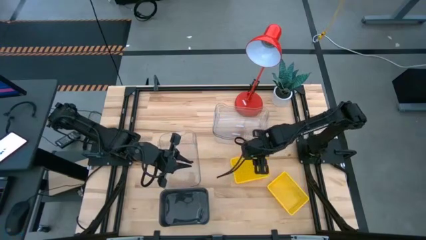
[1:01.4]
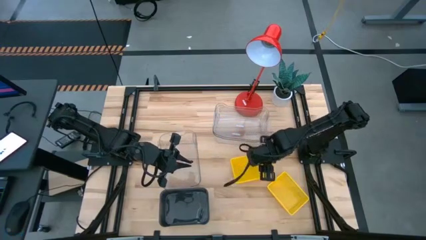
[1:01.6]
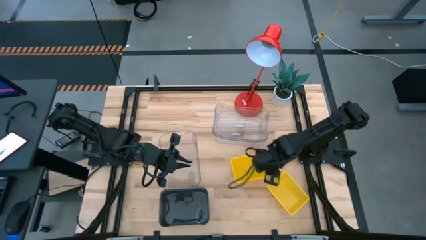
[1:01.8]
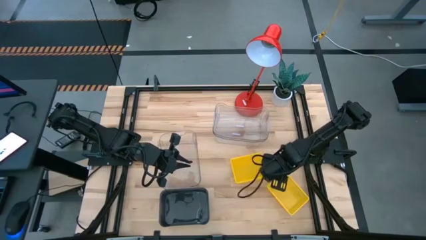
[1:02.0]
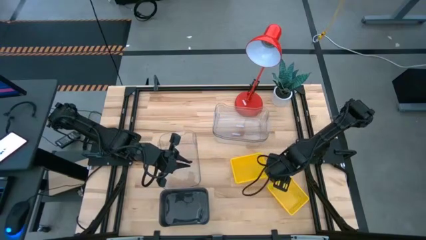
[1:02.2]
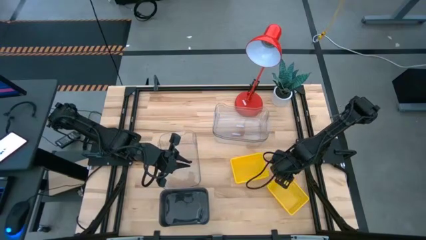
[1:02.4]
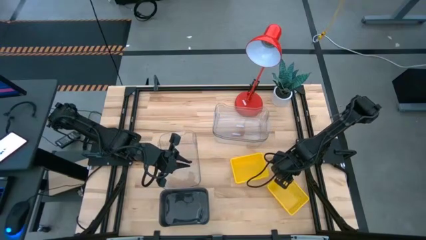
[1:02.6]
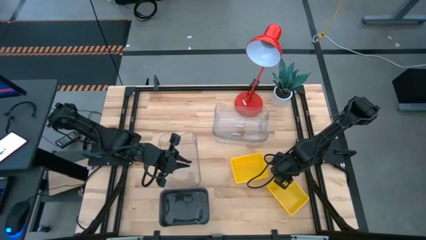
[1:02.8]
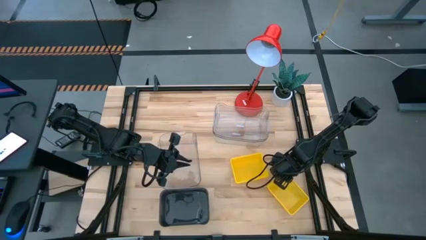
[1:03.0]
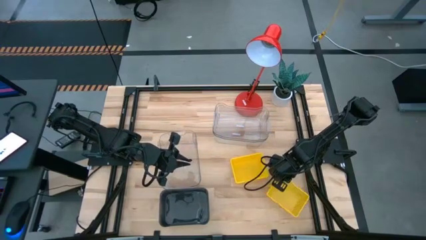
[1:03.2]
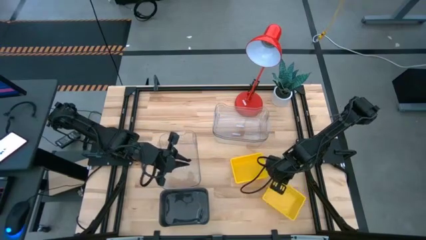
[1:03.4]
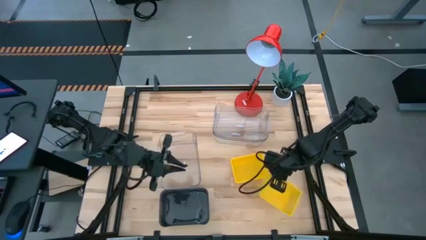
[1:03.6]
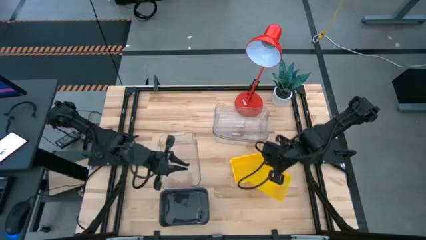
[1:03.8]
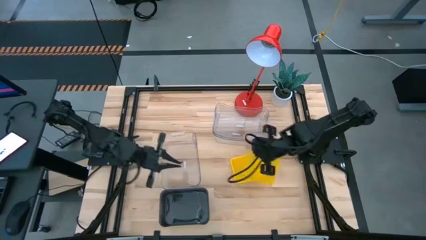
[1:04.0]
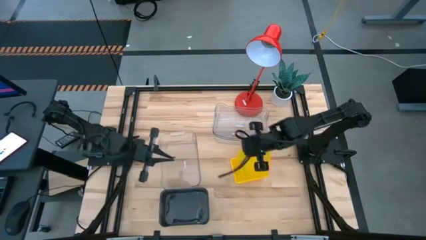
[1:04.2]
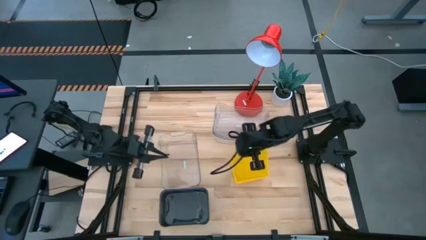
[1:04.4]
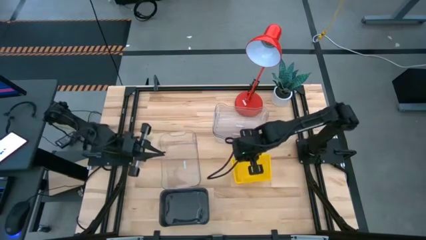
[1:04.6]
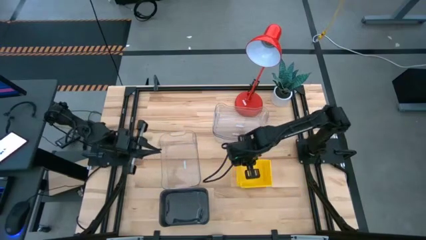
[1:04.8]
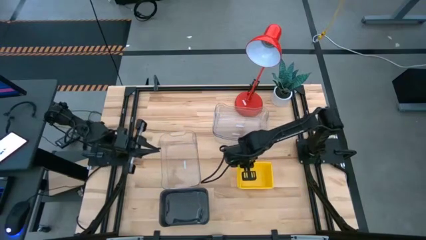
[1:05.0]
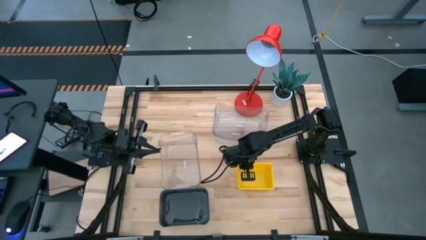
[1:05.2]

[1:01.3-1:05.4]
Stack the yellow bin on the left yellow bin

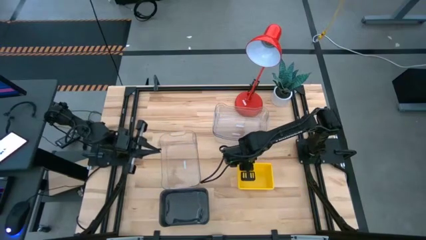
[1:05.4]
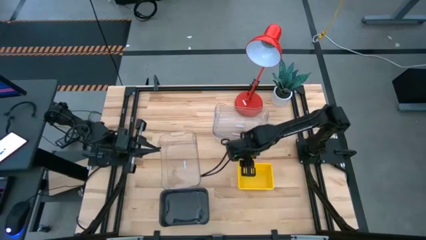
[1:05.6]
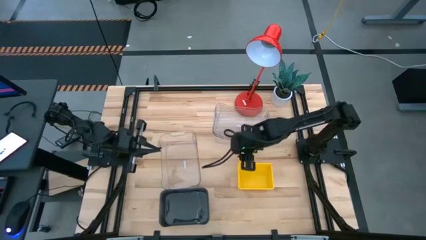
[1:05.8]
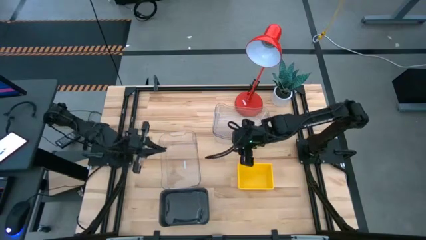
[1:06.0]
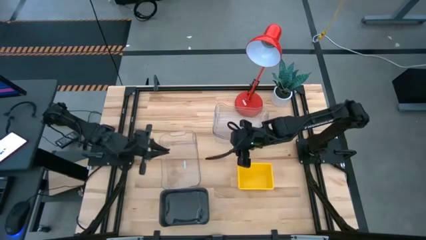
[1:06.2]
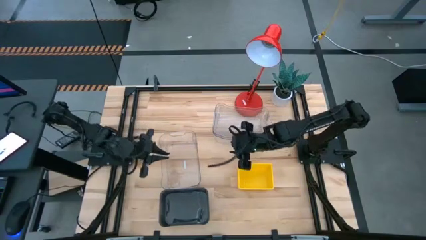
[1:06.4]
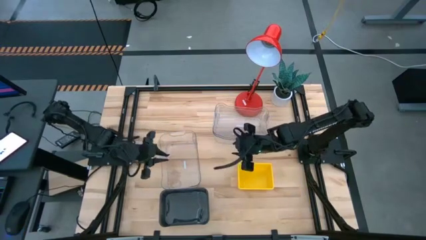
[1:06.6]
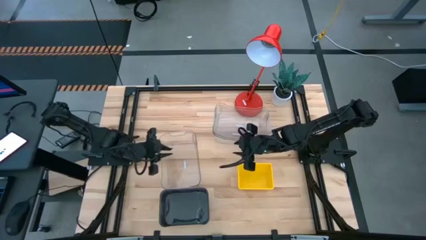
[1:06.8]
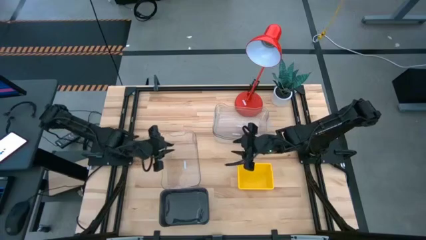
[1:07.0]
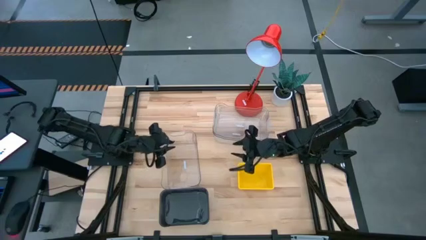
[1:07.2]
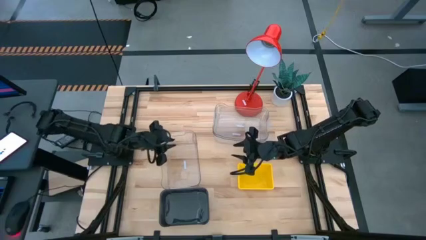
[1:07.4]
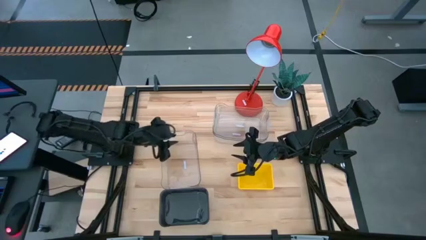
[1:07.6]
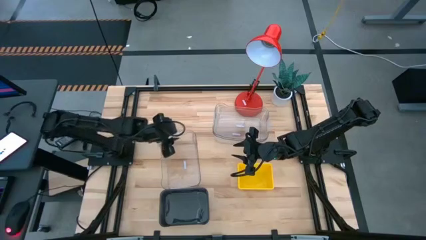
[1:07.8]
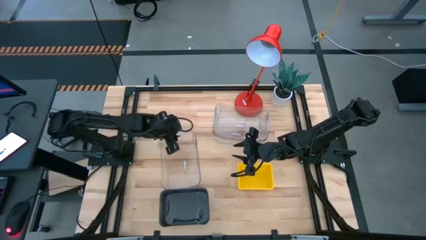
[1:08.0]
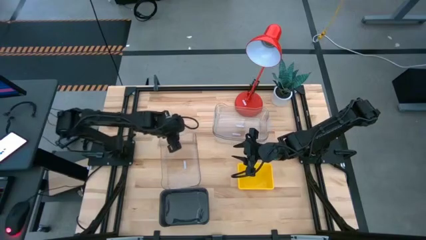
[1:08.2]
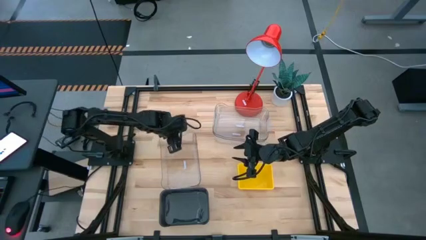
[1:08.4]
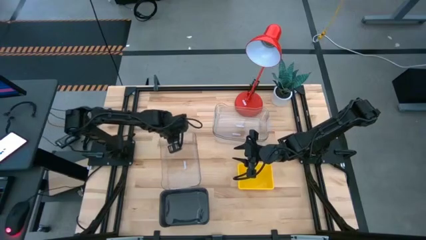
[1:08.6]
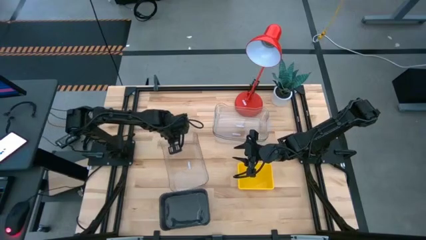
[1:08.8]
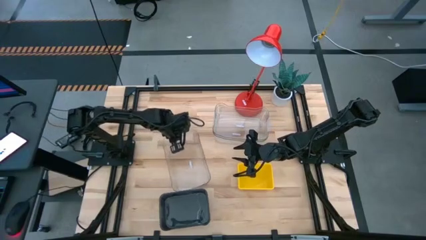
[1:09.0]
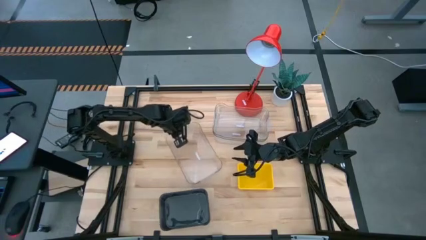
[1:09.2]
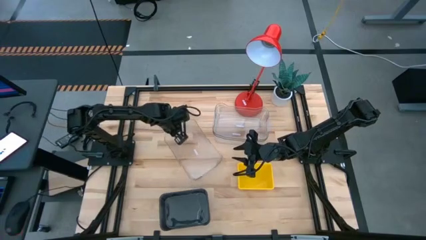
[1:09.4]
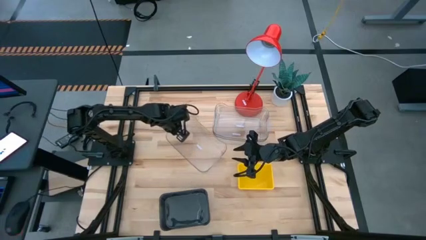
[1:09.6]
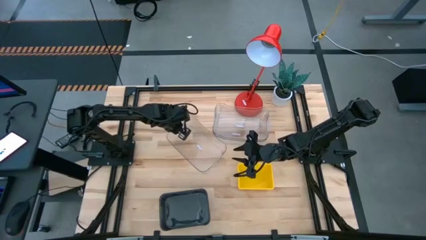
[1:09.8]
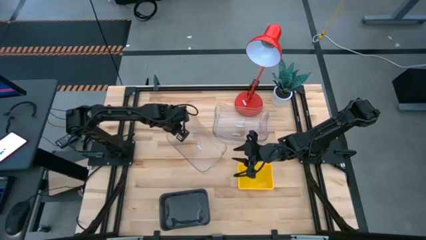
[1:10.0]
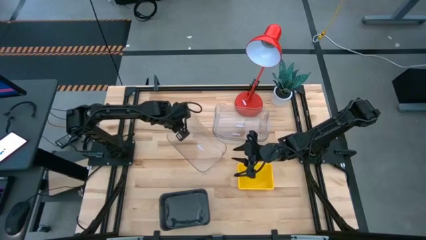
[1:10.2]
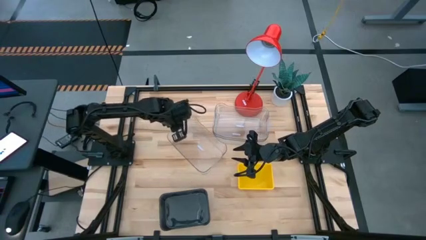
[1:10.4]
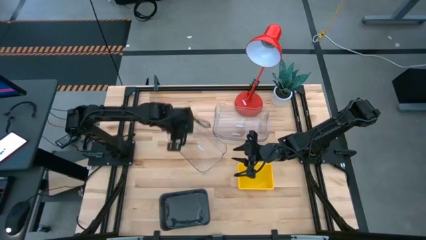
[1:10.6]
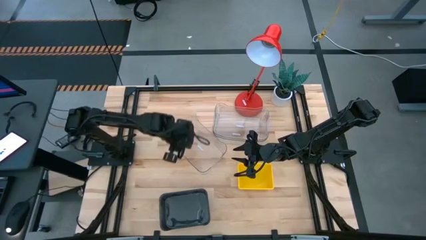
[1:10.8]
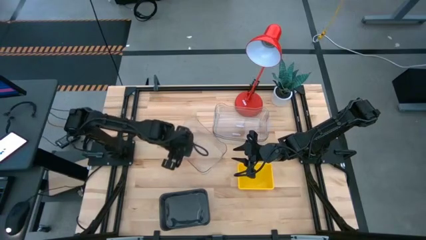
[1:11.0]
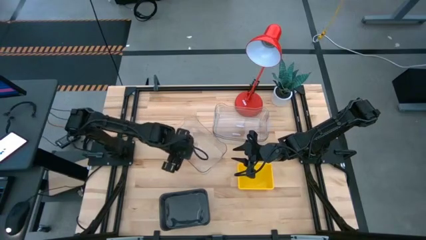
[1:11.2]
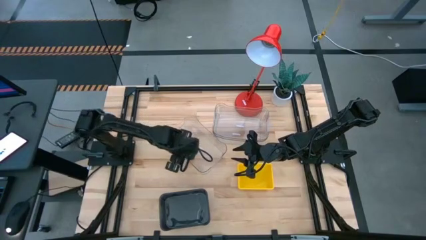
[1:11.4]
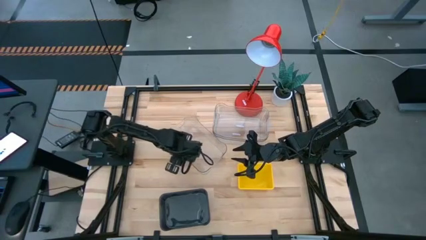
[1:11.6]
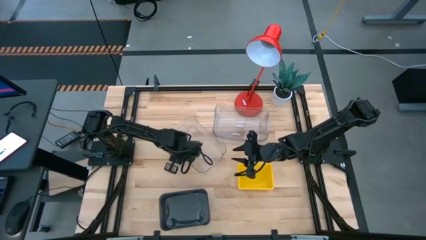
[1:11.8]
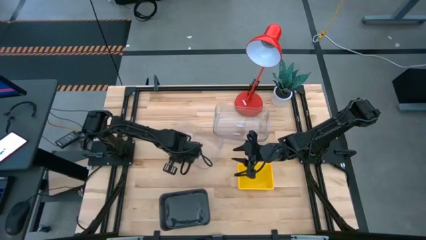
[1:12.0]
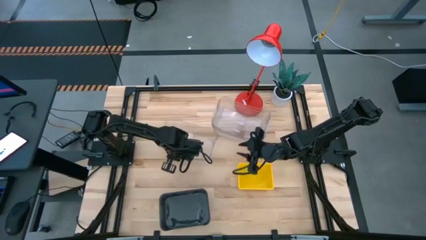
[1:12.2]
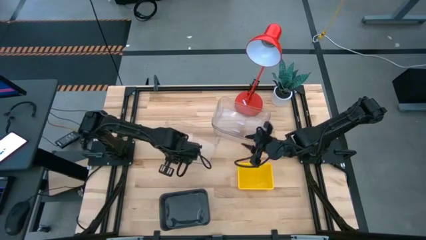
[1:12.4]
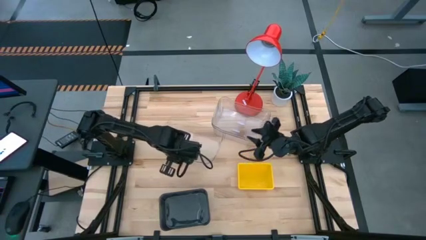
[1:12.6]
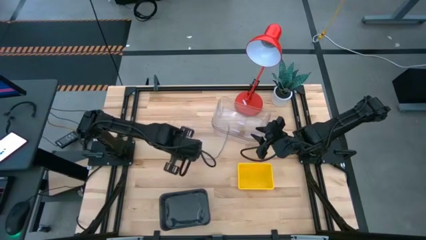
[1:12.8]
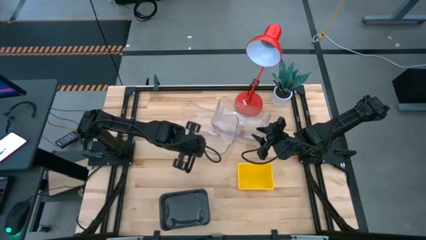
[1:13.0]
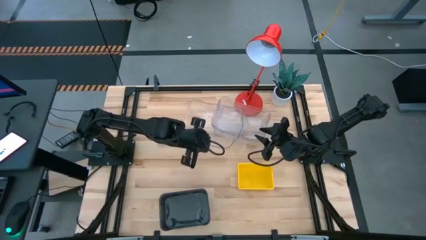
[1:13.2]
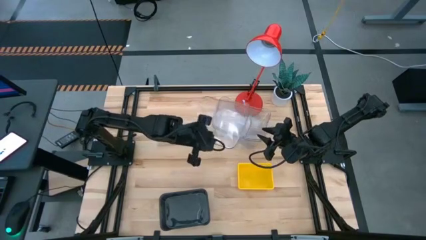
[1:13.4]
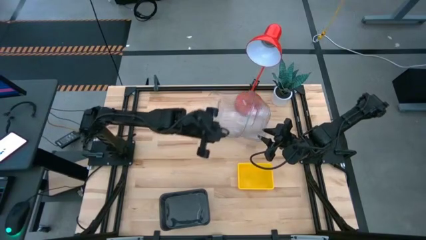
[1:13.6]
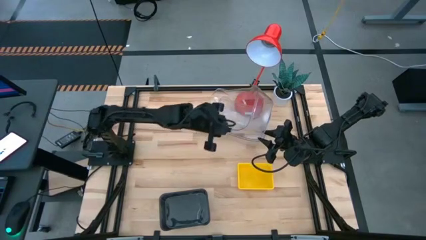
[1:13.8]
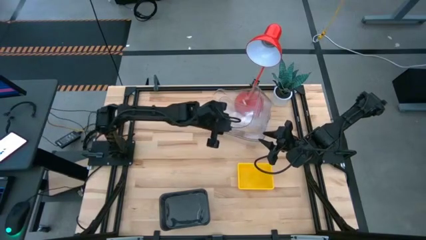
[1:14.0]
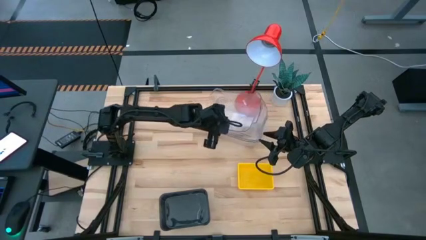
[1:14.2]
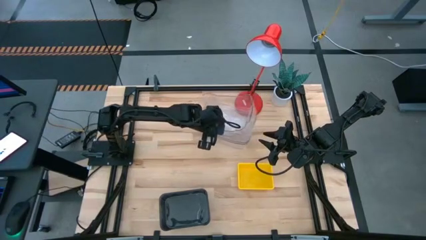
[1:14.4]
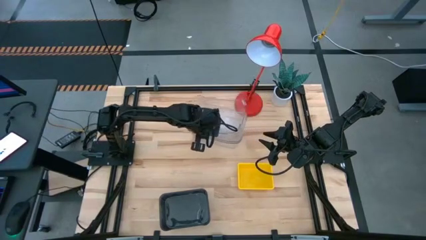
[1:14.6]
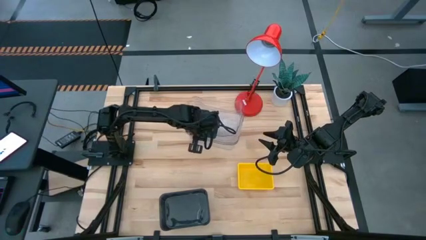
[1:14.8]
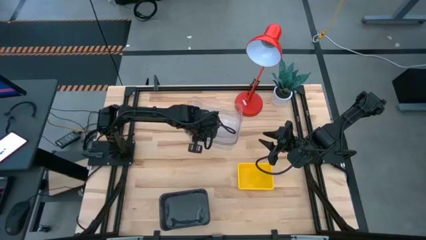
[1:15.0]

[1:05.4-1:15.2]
Stack the transparent bin on the right transparent bin
